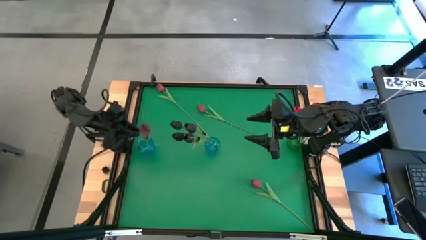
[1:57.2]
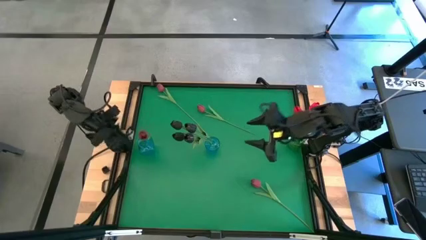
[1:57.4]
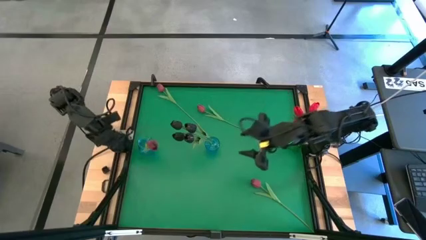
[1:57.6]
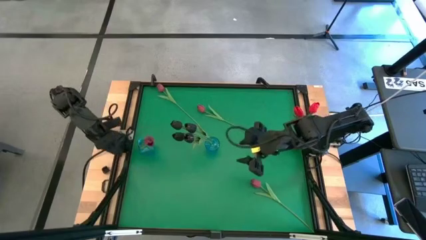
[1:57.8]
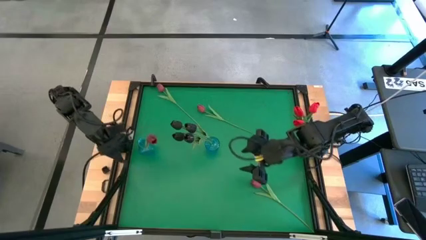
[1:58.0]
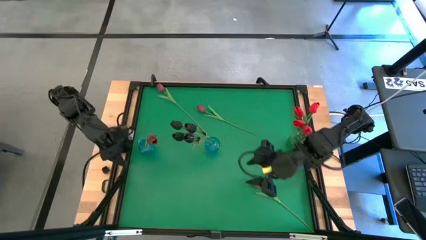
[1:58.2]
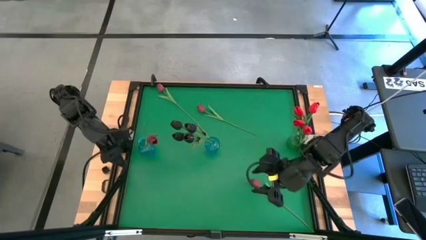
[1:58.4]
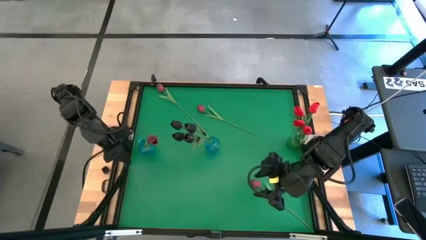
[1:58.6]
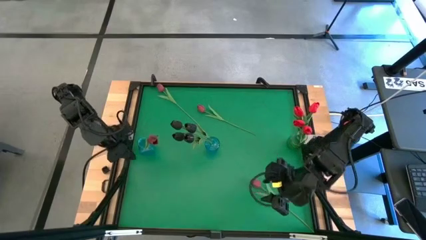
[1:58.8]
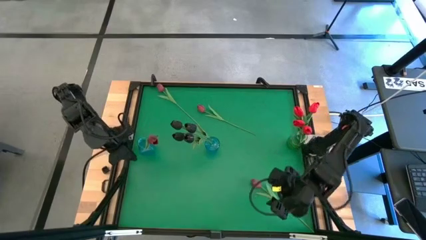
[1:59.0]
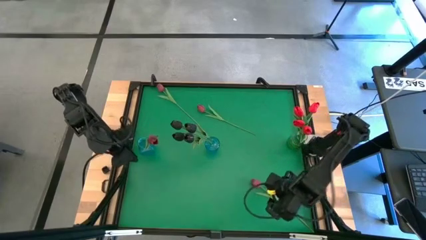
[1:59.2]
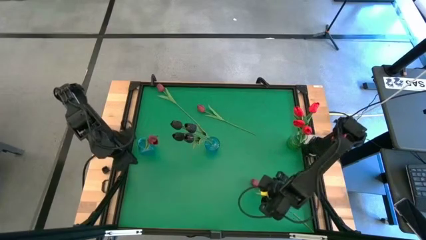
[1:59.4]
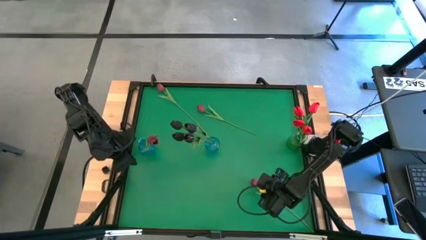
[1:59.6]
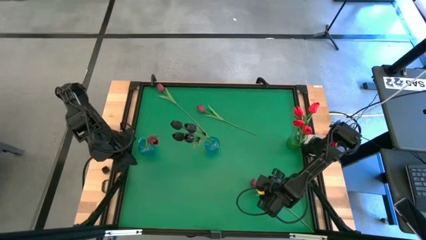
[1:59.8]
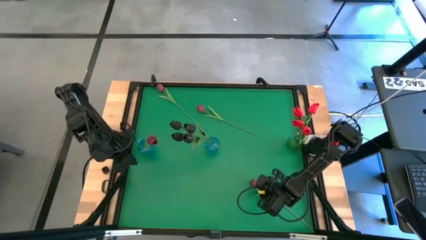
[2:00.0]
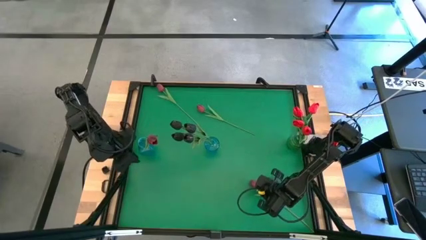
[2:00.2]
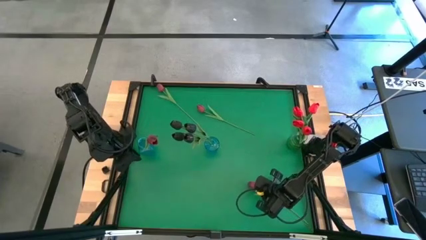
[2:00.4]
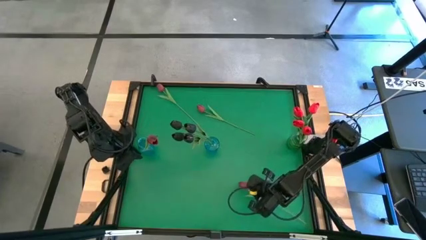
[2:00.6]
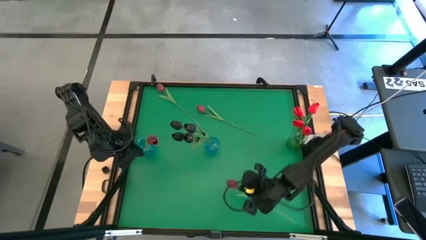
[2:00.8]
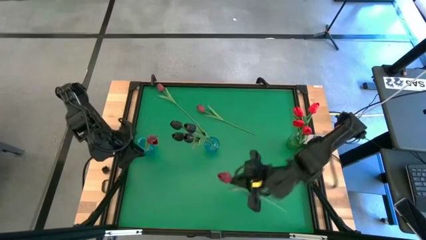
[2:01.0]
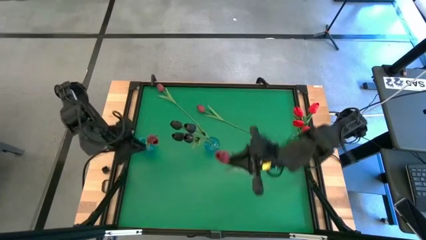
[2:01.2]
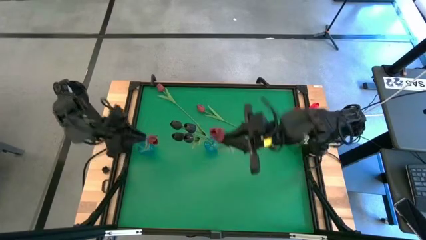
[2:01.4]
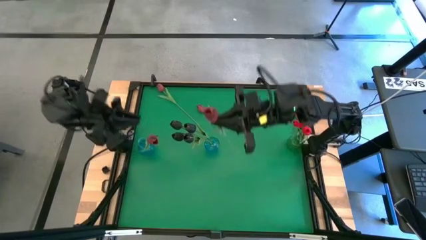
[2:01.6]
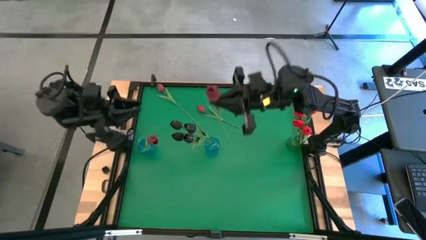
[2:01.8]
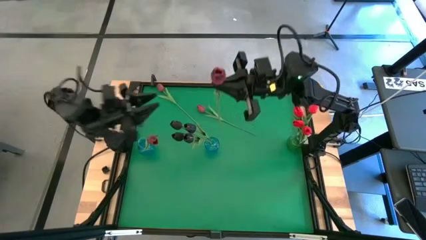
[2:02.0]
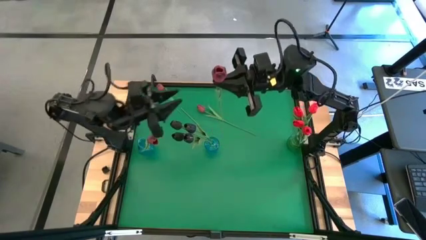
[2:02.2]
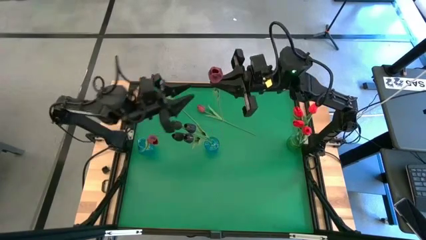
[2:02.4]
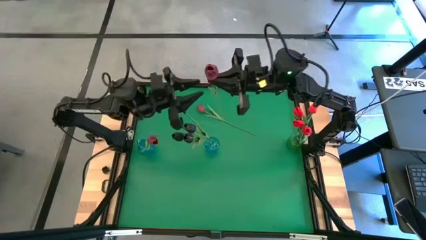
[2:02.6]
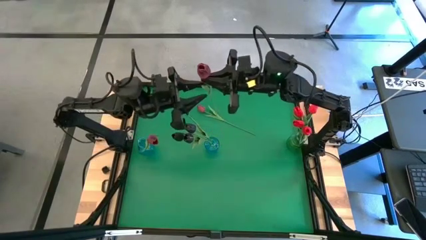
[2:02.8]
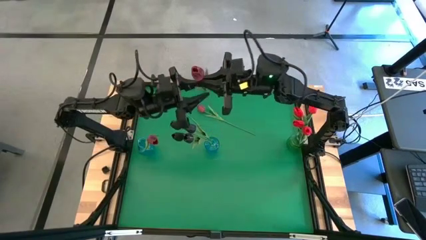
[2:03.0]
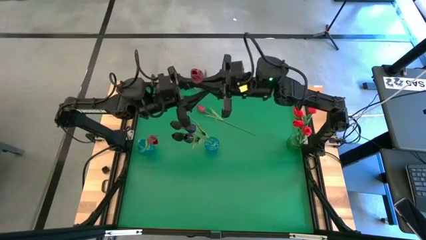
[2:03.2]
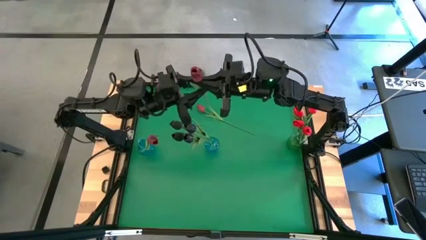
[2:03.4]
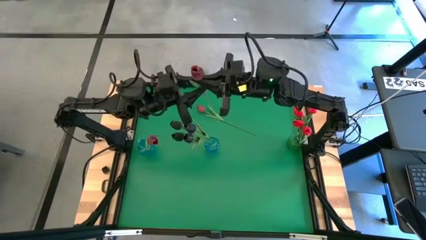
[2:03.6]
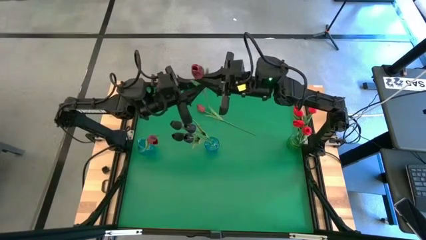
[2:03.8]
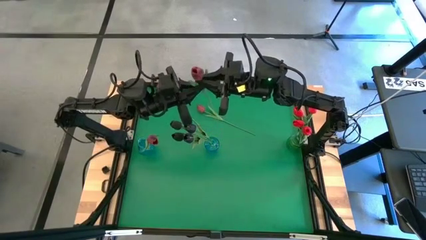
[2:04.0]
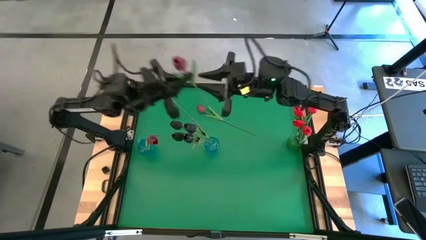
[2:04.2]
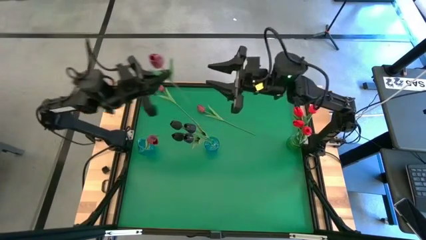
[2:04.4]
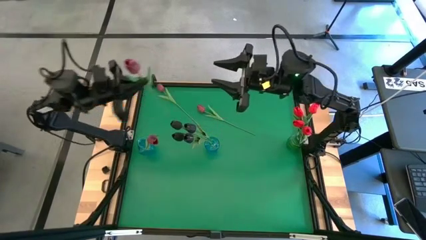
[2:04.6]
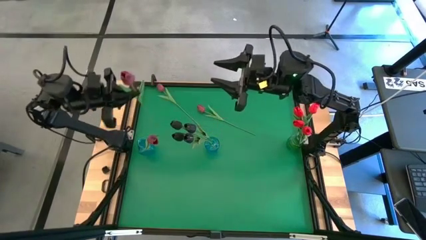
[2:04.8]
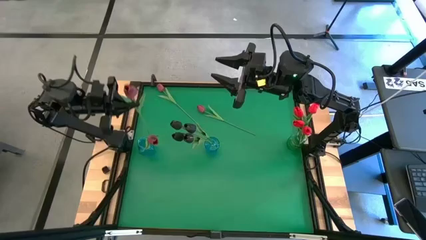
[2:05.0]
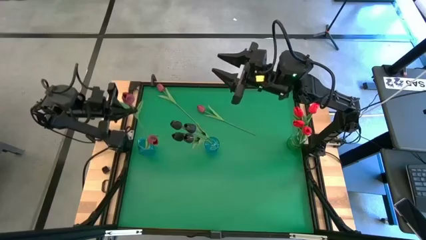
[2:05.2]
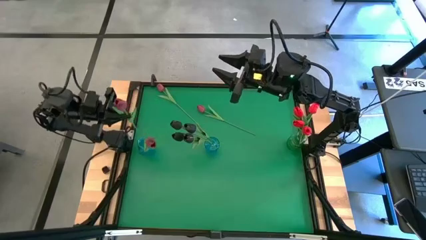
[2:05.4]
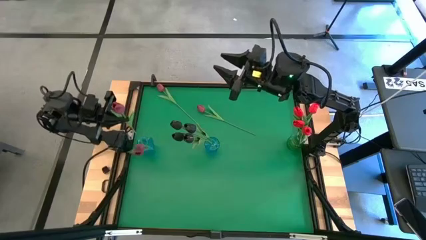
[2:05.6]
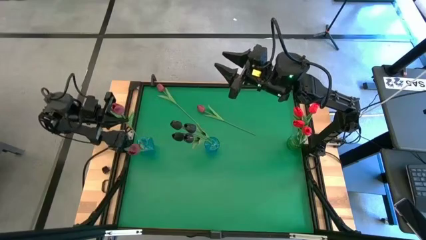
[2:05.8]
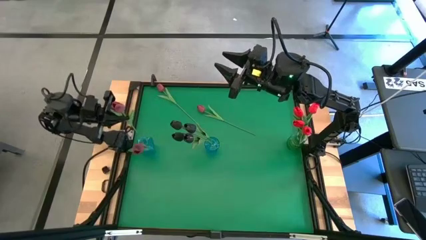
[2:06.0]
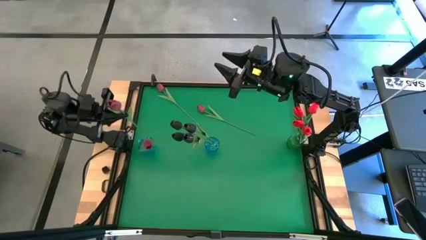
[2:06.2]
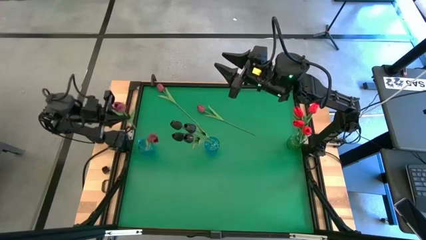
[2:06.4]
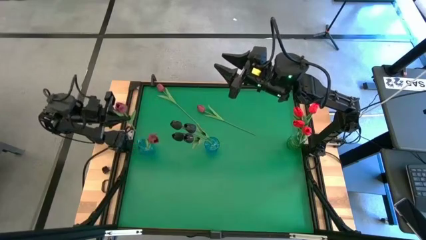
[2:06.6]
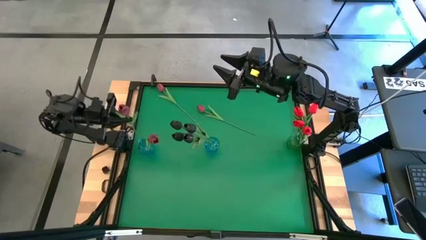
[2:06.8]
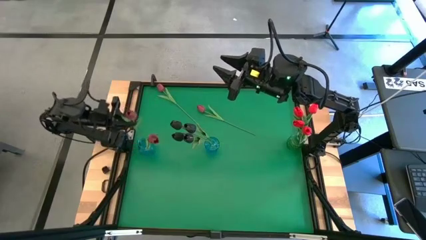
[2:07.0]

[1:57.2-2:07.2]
Task: Sort flowers into vase by color
Put the red flower into the left blue flower vase

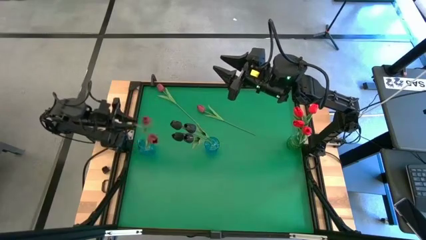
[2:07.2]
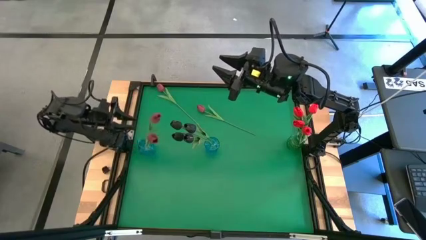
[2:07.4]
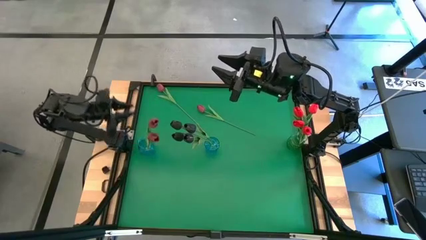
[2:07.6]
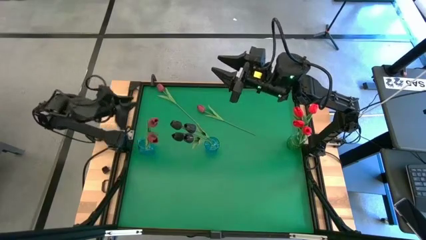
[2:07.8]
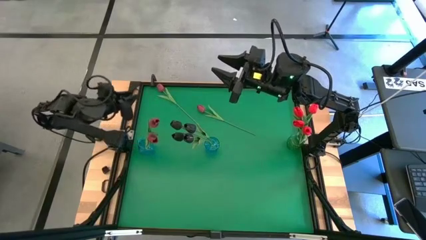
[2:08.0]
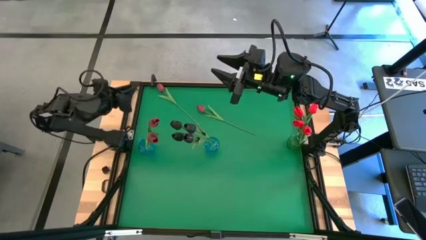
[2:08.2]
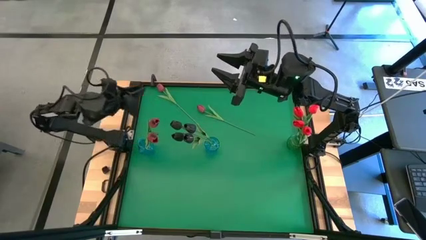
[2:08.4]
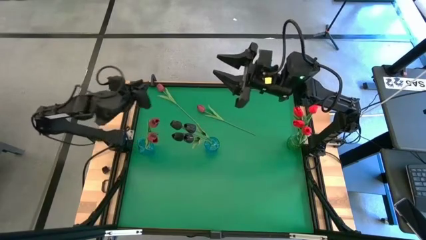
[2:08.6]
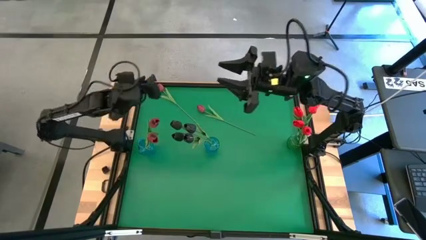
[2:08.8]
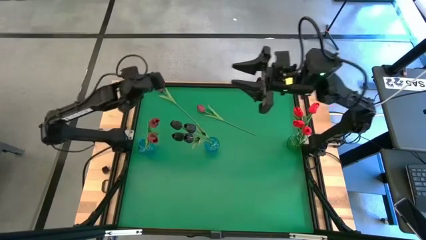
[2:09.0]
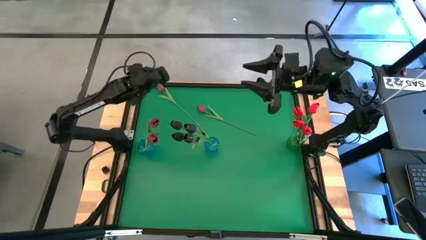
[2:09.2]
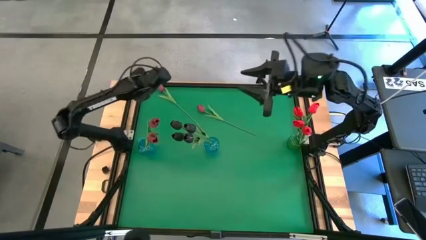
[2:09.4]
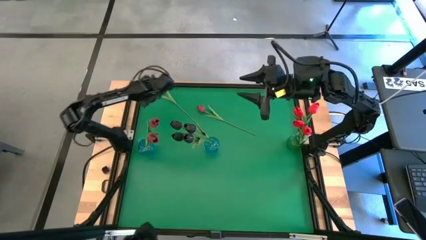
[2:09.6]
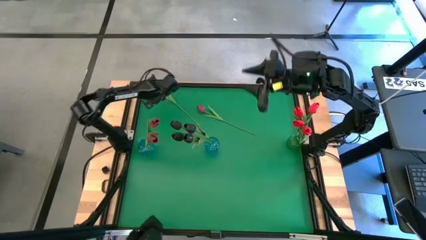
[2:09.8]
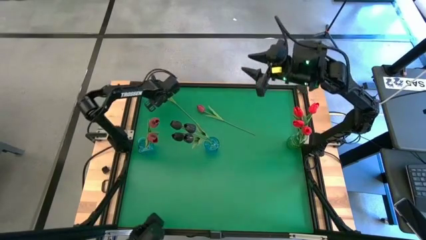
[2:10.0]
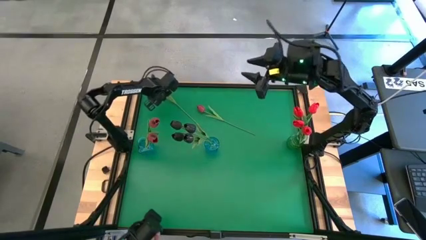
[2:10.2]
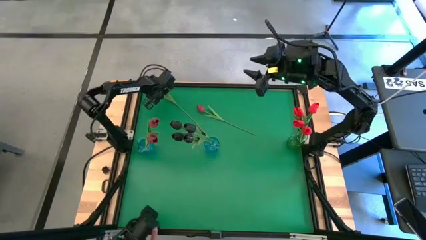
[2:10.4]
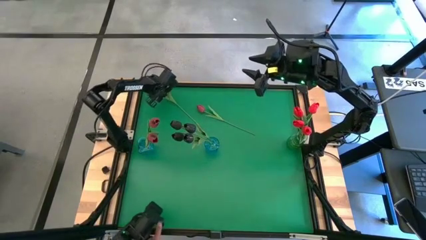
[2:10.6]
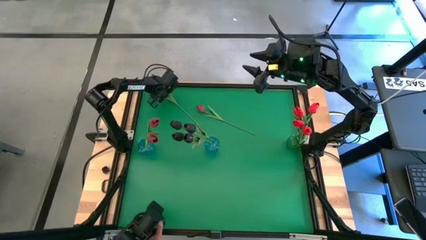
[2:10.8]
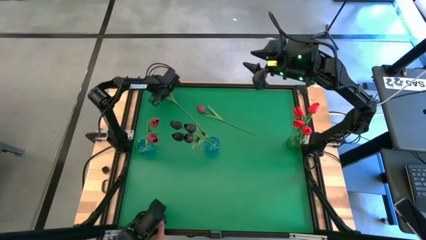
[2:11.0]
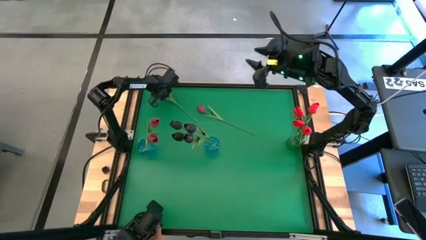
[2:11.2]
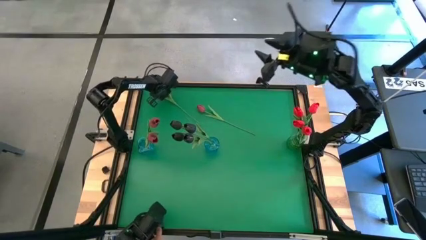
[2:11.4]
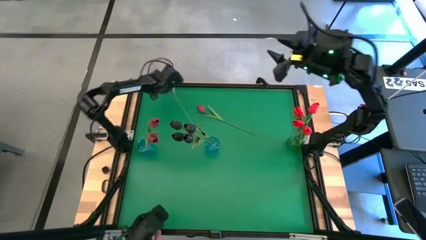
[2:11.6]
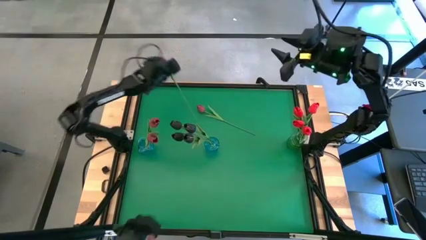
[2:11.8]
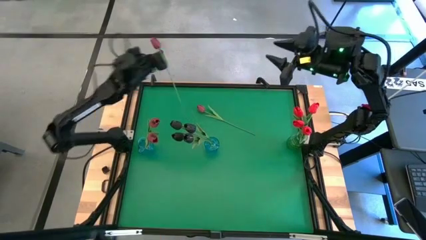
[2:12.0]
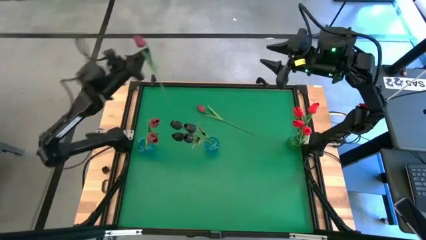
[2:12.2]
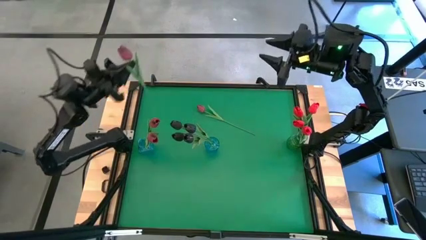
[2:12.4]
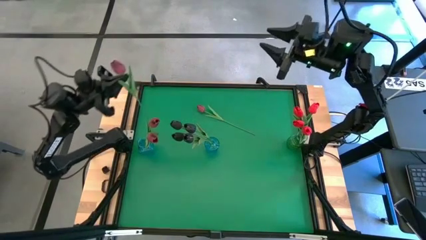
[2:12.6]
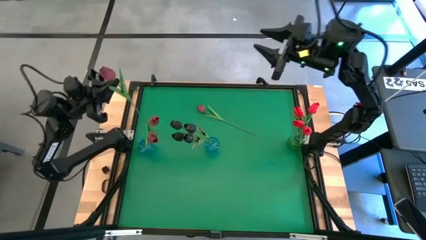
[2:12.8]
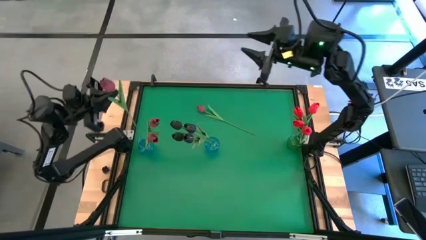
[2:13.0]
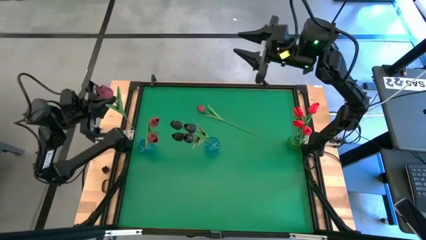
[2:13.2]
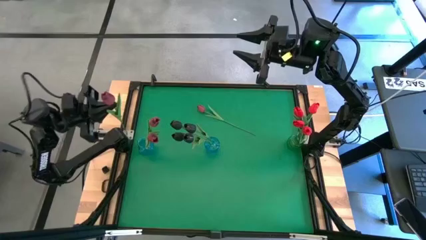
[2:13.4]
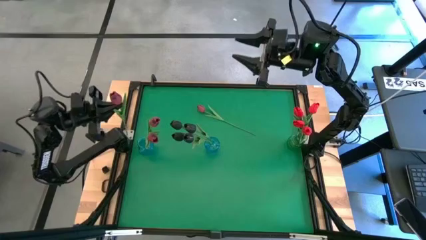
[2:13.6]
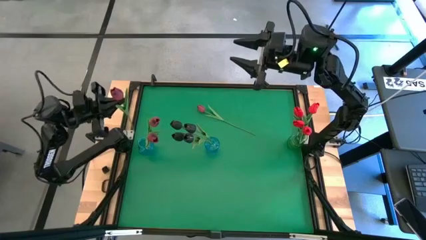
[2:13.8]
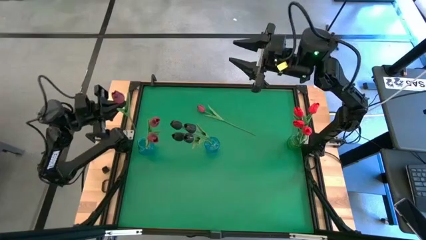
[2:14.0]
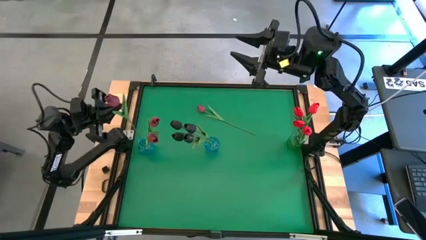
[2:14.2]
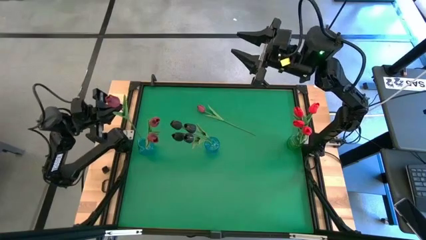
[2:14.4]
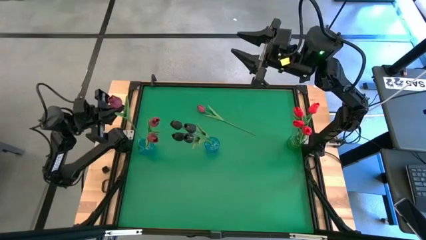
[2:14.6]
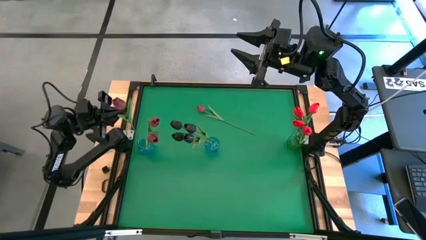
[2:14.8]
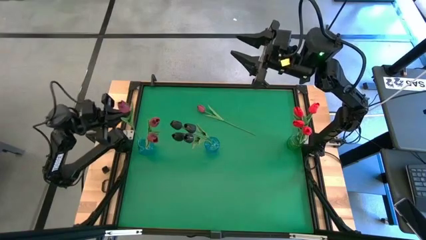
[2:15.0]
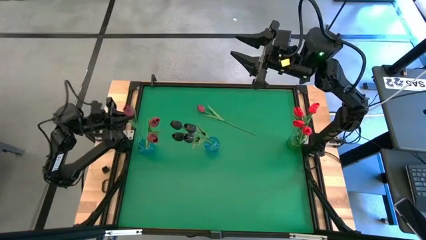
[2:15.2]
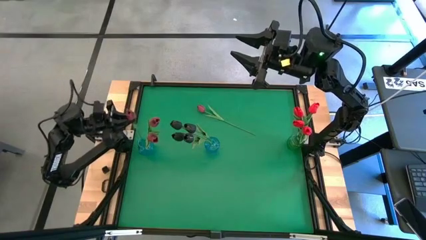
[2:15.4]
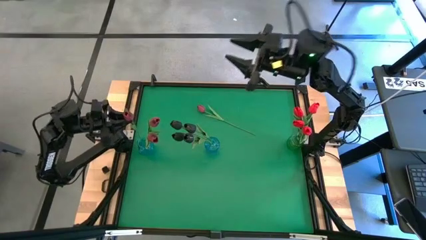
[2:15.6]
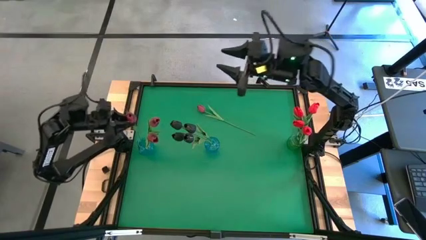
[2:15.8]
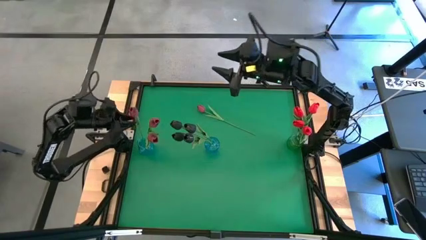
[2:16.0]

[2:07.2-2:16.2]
Put the red flower into the left blue flower vase
